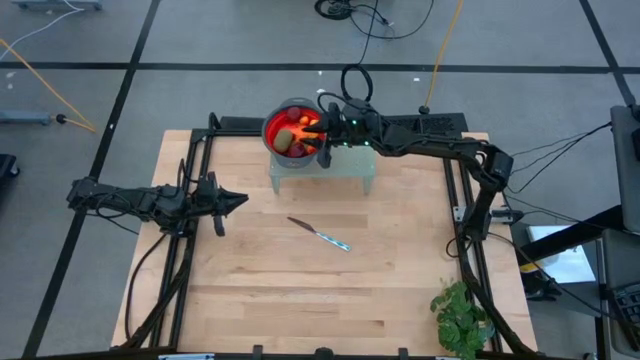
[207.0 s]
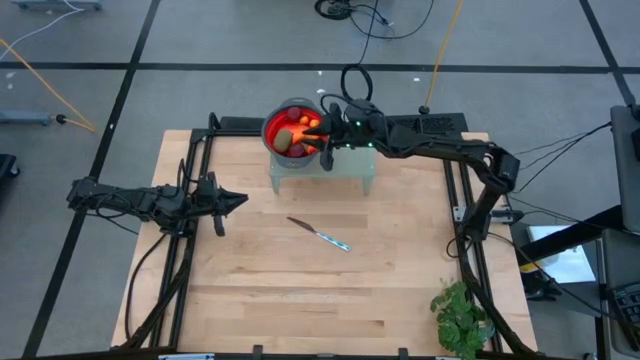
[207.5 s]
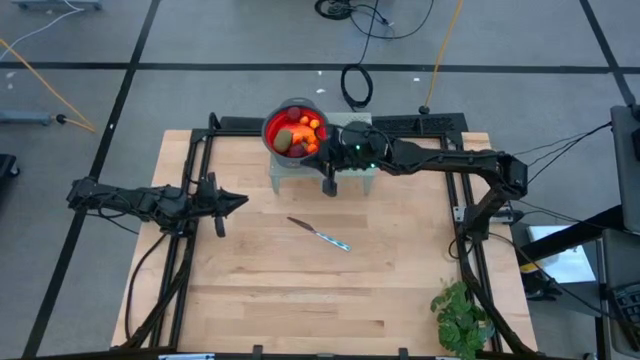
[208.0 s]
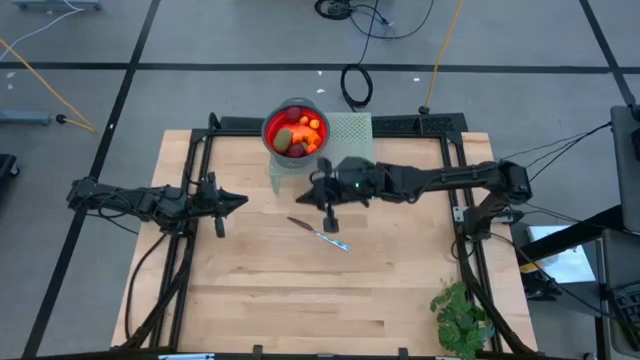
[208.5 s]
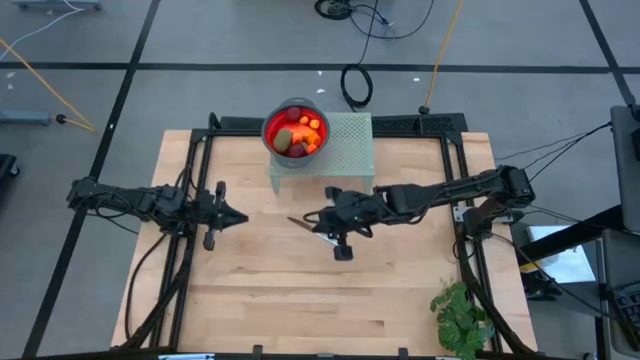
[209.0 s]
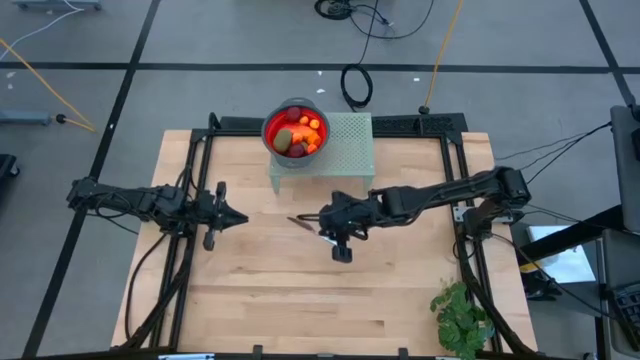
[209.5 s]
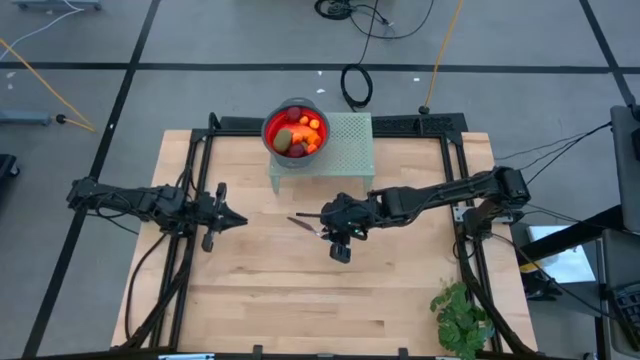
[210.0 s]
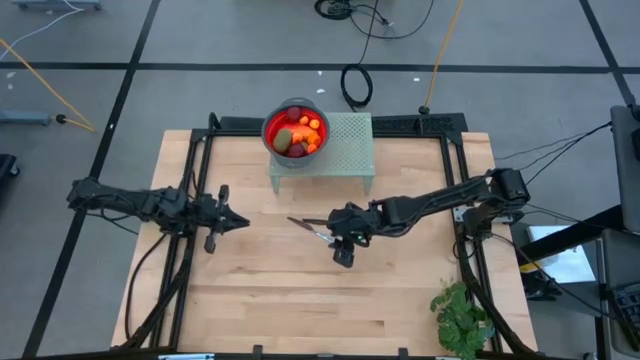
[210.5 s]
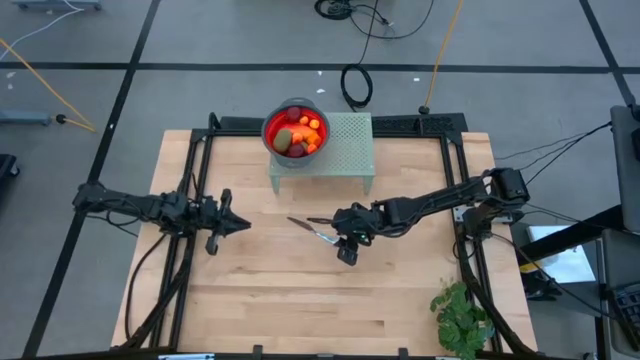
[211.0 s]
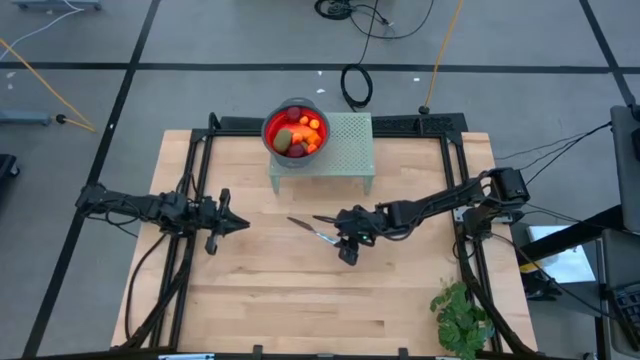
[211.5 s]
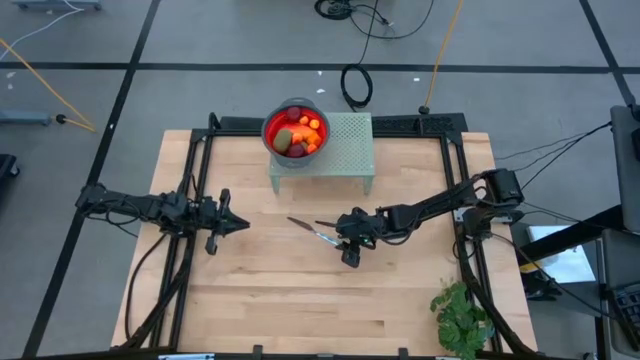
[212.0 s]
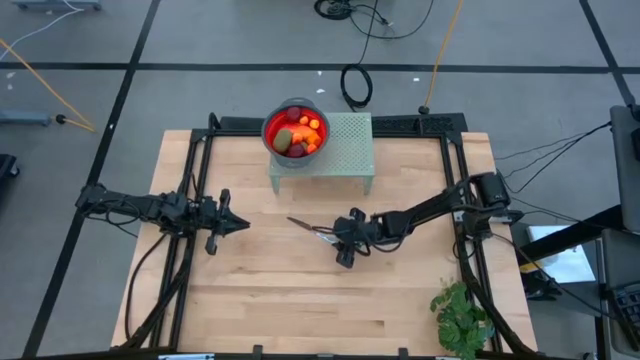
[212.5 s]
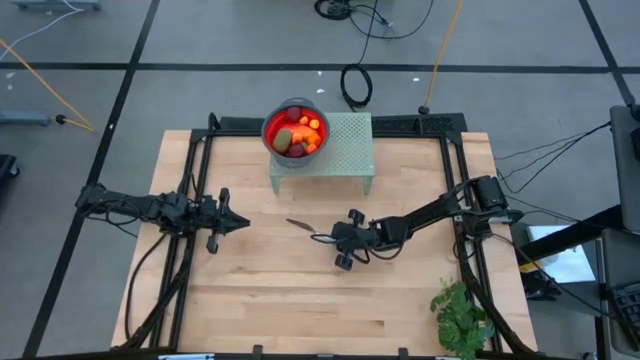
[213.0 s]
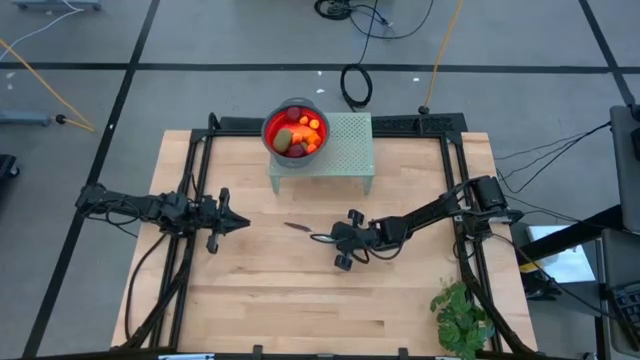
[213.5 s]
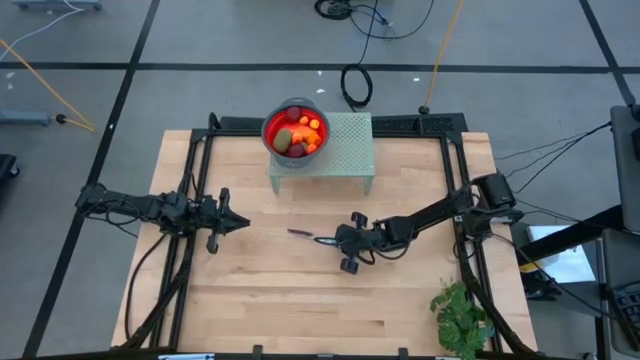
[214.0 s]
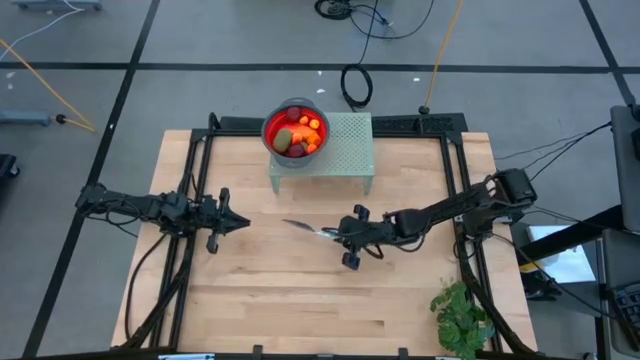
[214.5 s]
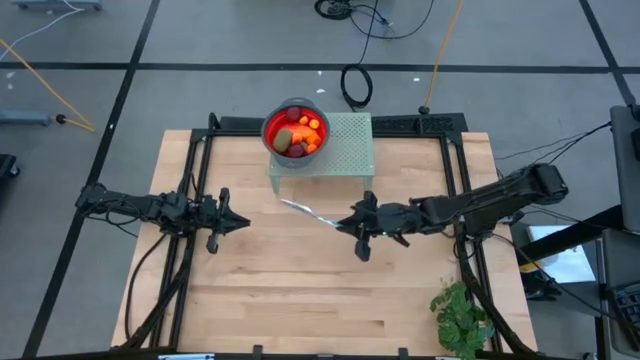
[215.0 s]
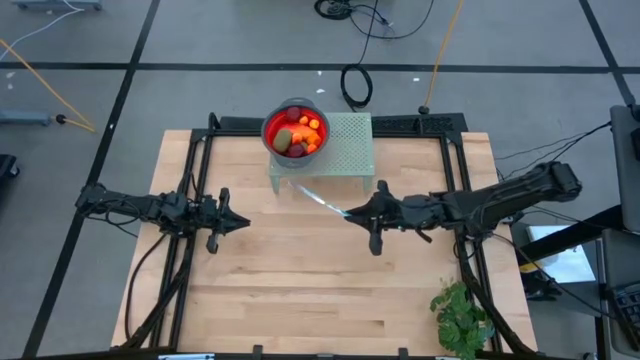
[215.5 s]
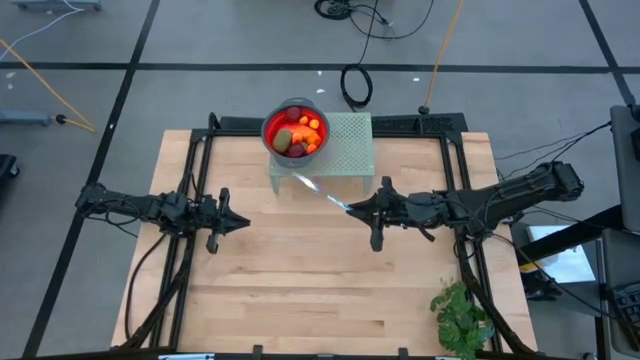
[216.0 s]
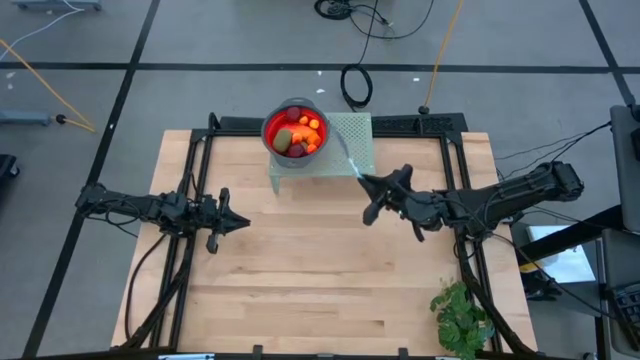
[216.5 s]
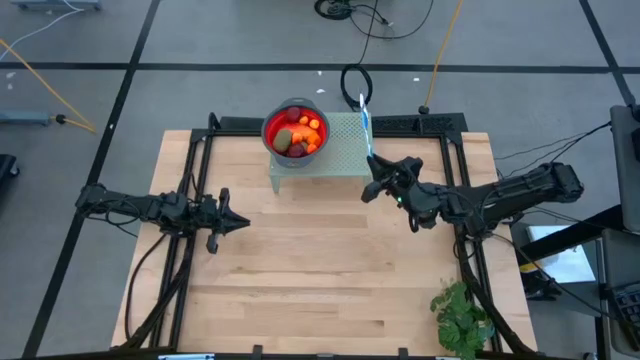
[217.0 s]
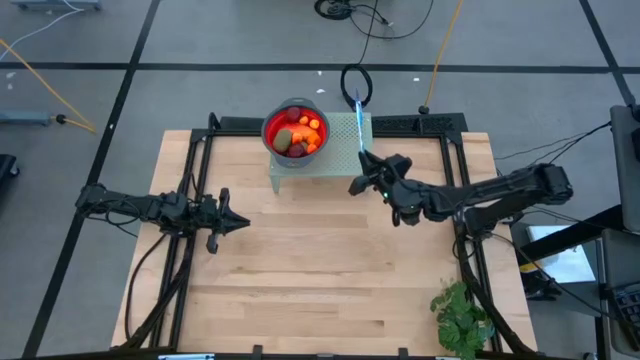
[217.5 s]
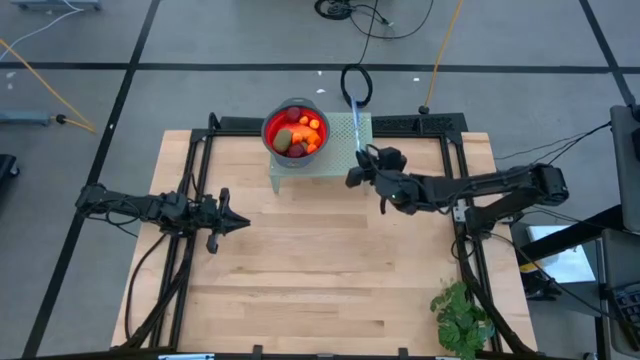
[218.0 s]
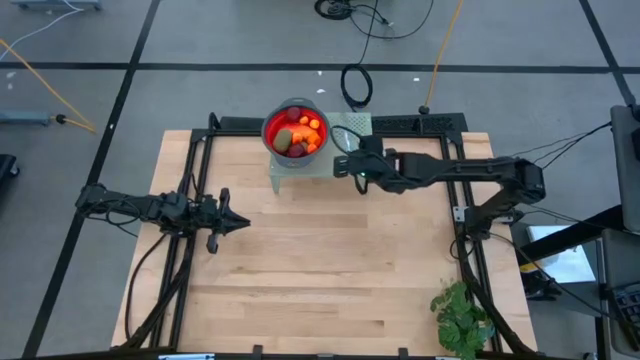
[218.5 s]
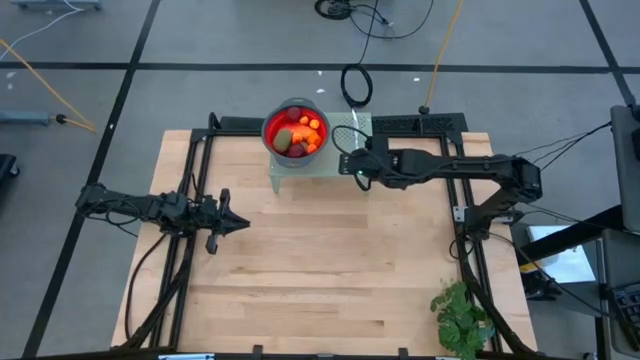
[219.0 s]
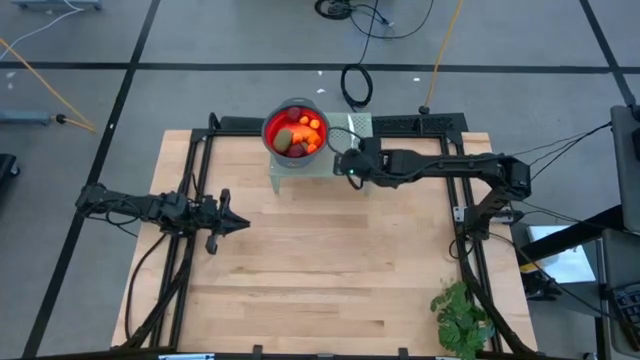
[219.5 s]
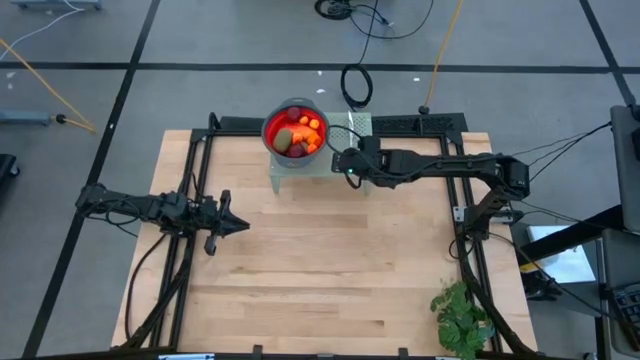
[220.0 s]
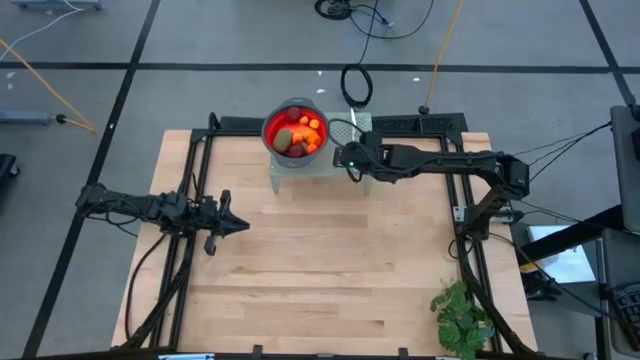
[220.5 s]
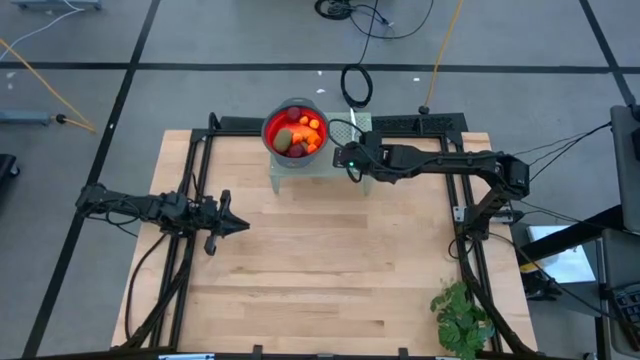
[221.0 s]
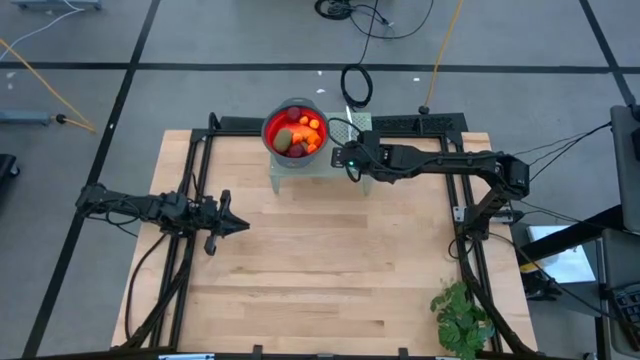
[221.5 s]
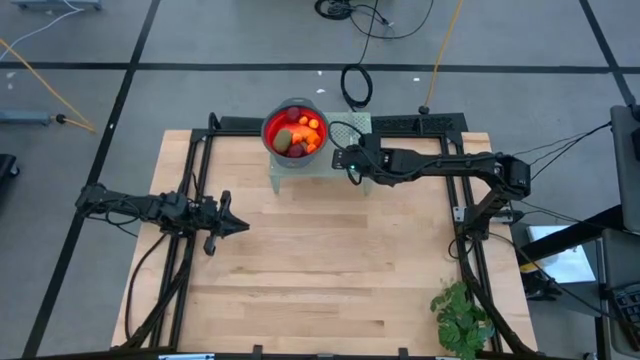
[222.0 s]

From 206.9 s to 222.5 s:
Task: Pick & Place Fruit
Put the knife on the shelf

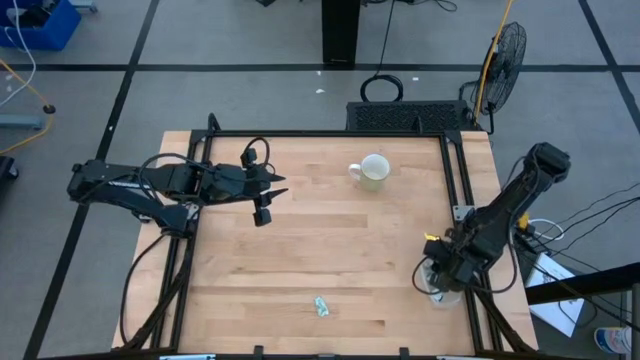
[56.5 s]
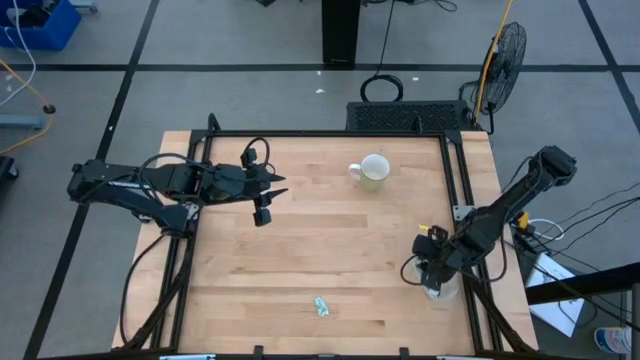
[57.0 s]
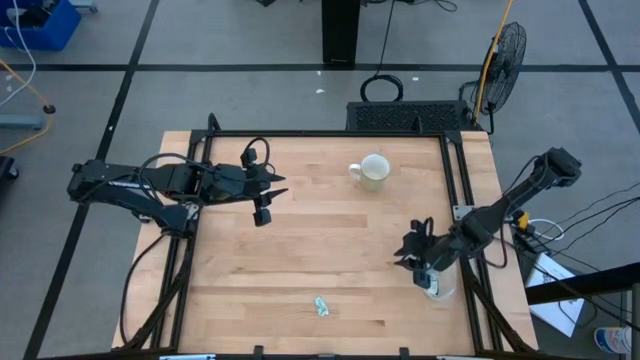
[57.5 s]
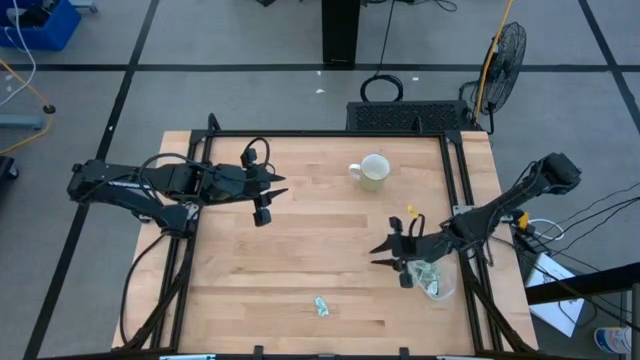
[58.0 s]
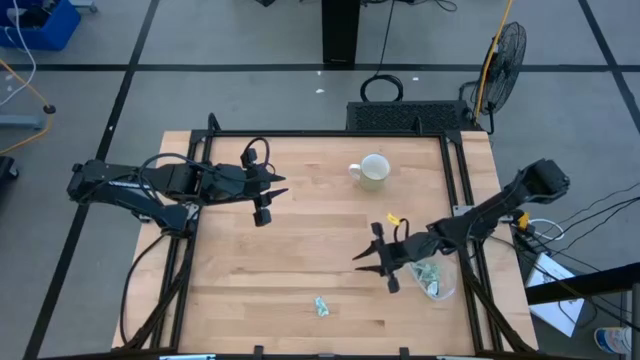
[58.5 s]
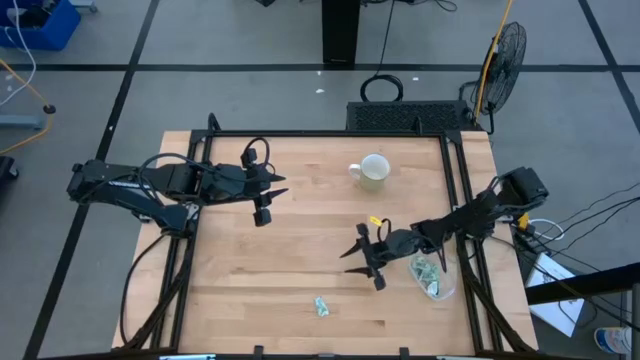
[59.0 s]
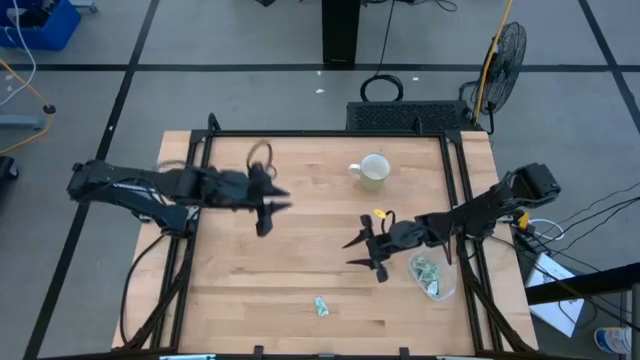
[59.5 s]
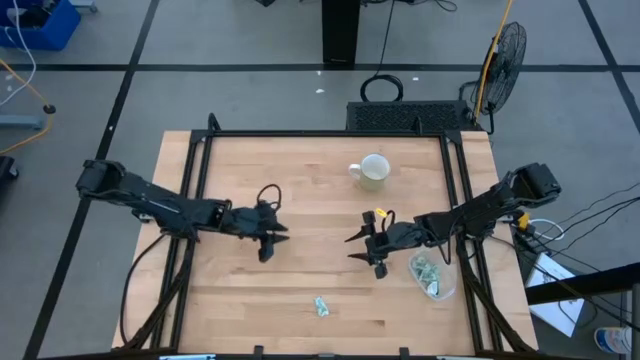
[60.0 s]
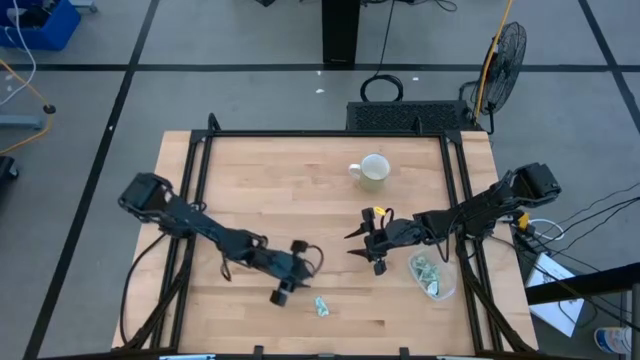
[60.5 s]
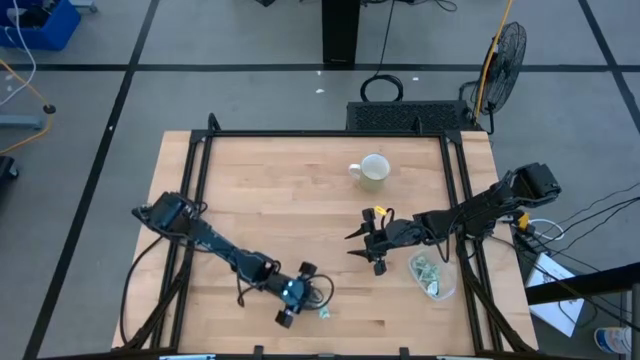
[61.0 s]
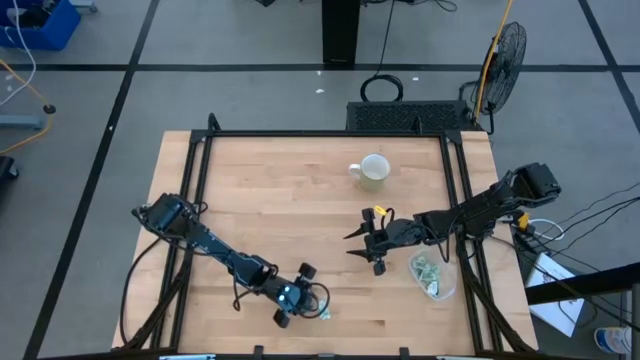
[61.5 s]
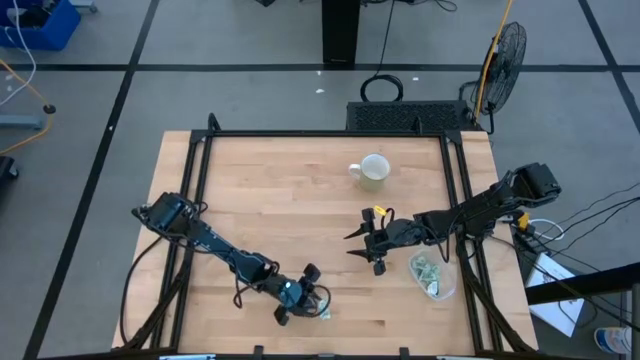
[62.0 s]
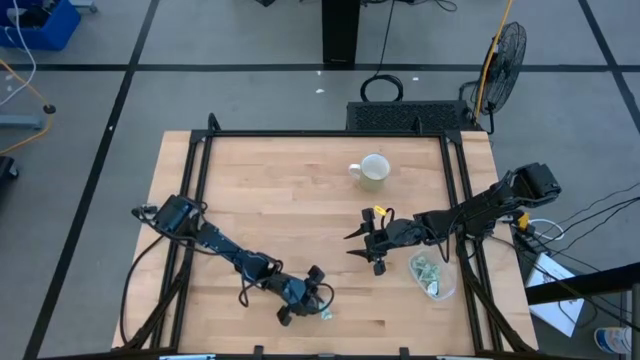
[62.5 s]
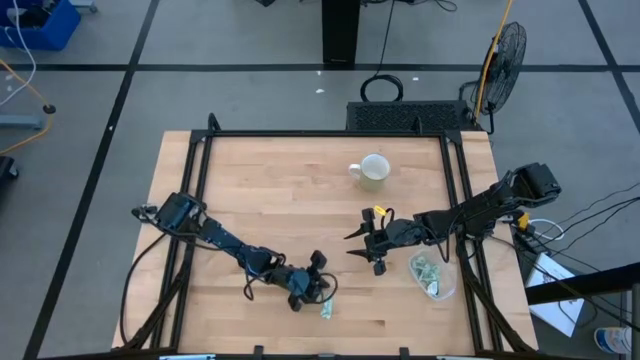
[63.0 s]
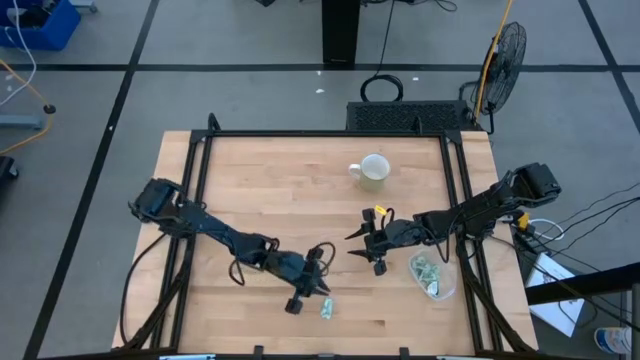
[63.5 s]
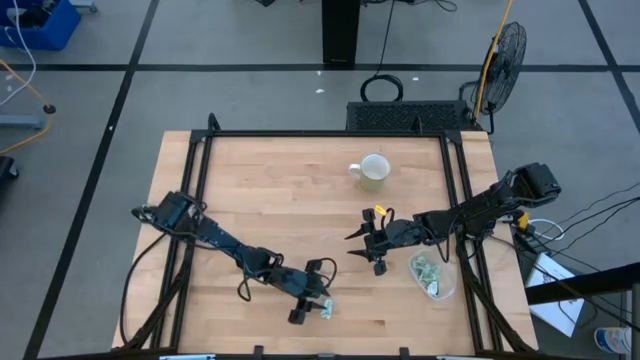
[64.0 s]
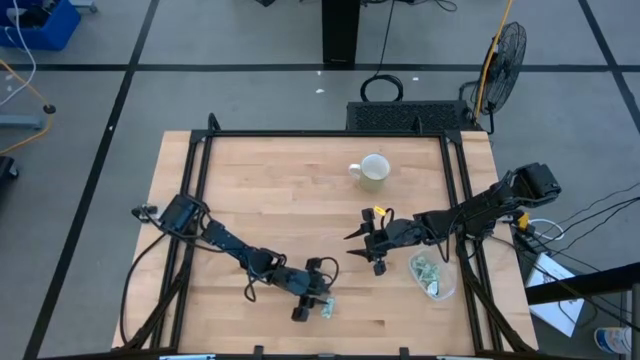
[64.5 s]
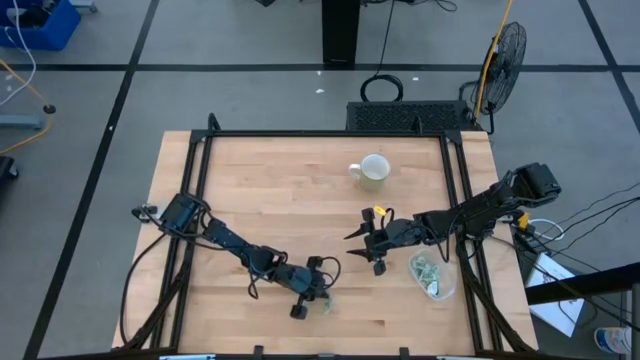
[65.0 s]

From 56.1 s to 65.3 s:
Task: Pick and place Stevia / Truvia into bins
Put the stevia packet into the transparent bin
